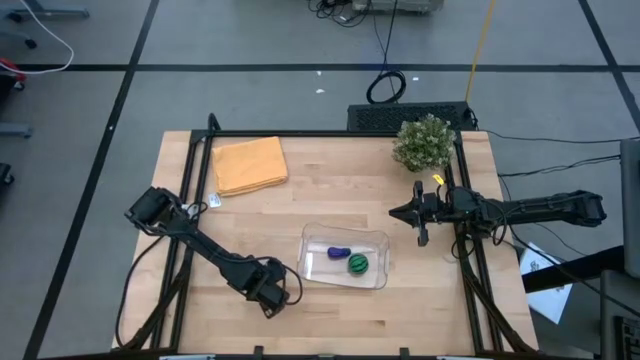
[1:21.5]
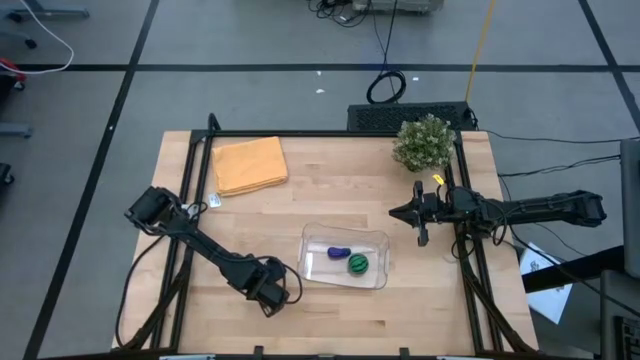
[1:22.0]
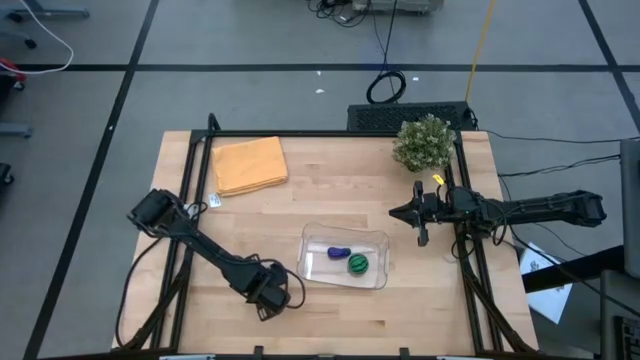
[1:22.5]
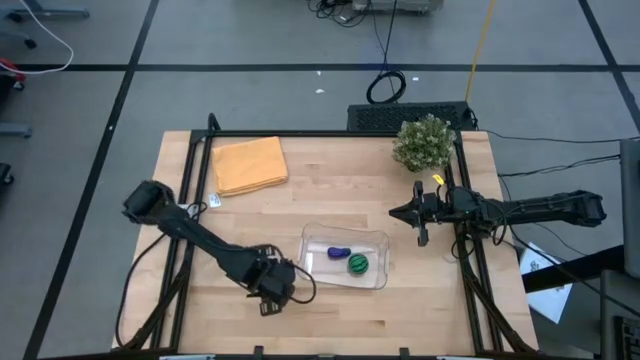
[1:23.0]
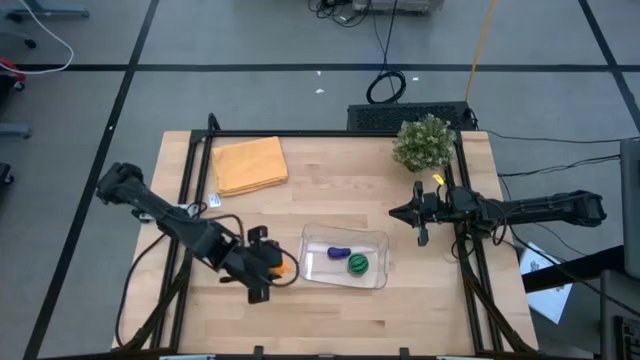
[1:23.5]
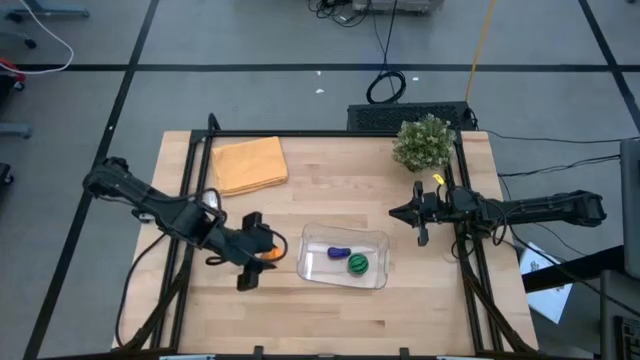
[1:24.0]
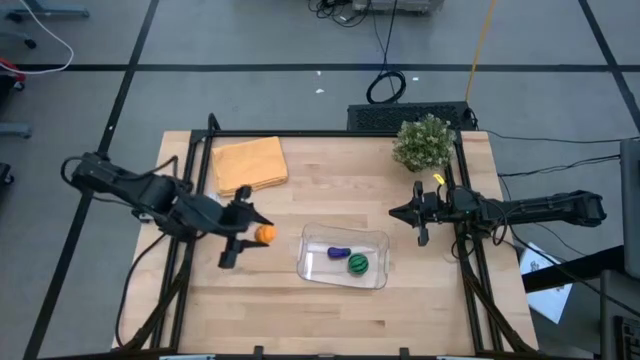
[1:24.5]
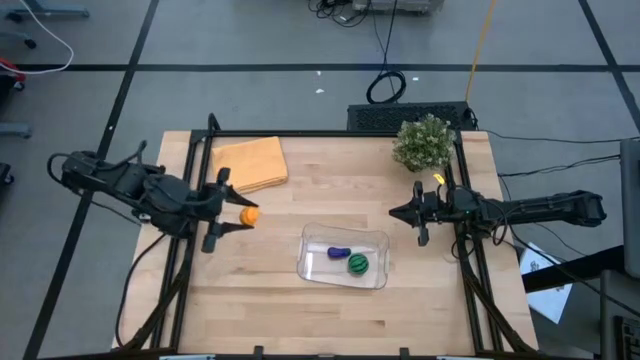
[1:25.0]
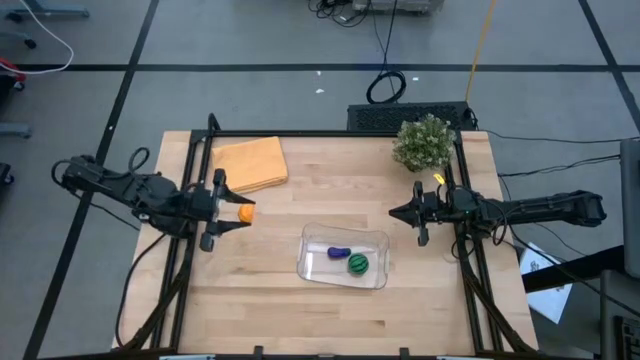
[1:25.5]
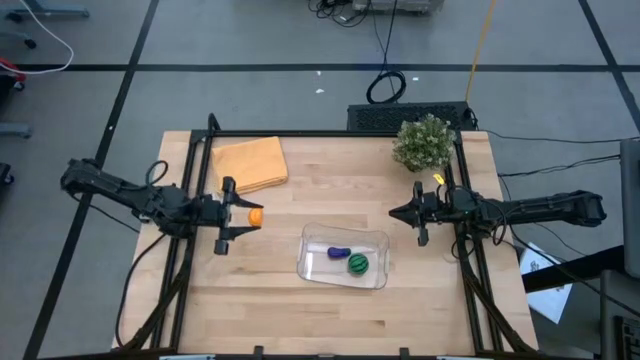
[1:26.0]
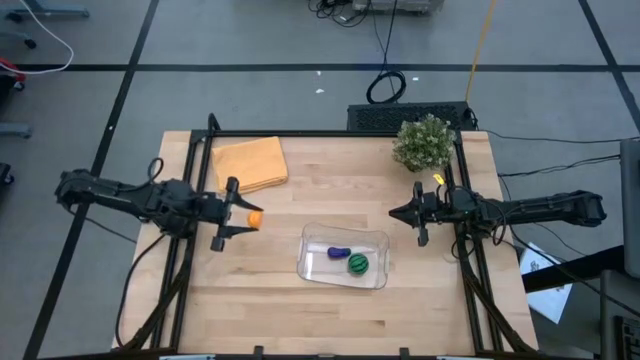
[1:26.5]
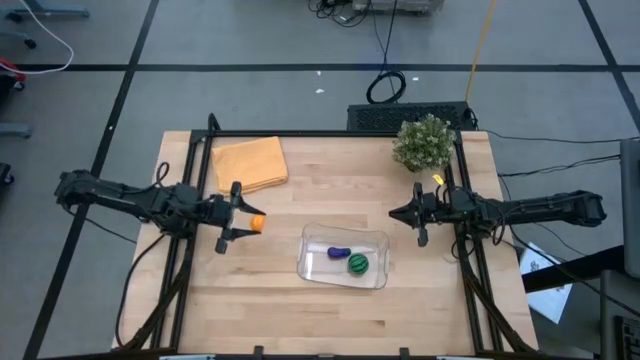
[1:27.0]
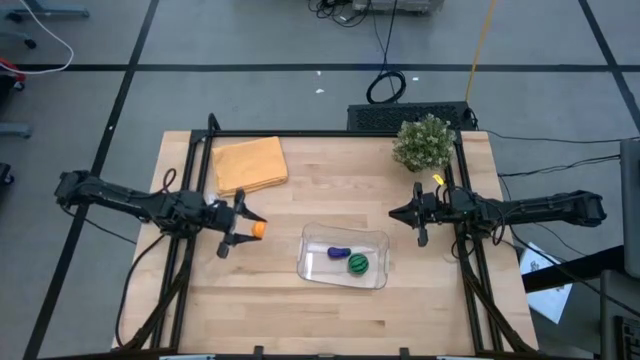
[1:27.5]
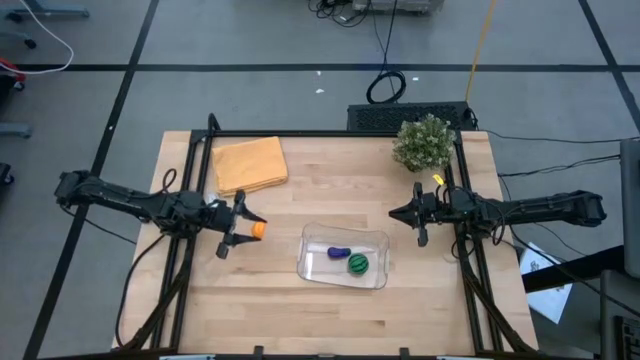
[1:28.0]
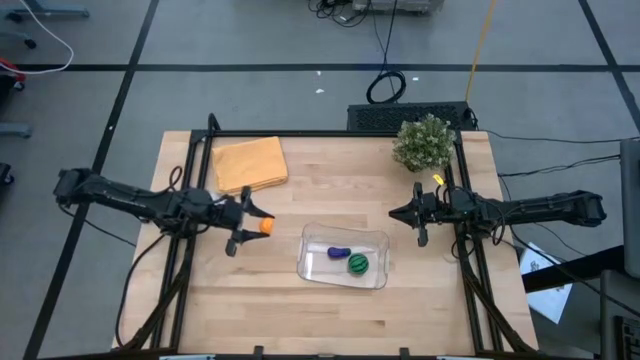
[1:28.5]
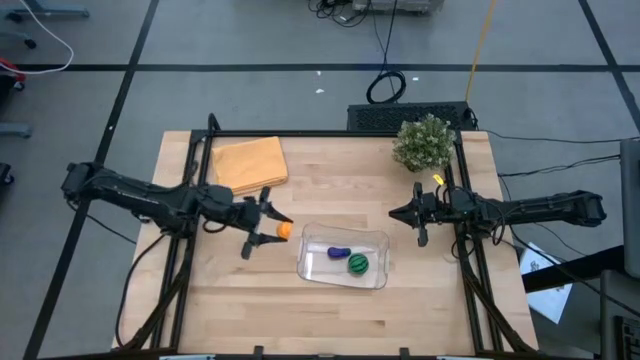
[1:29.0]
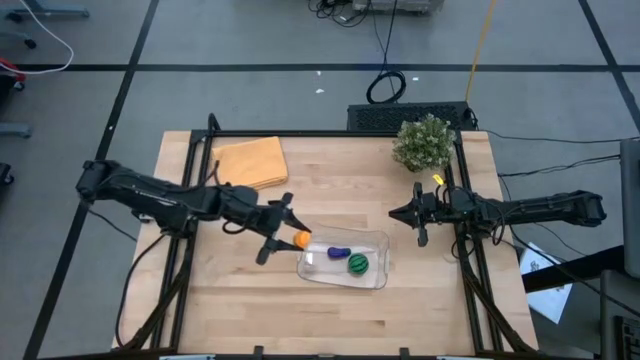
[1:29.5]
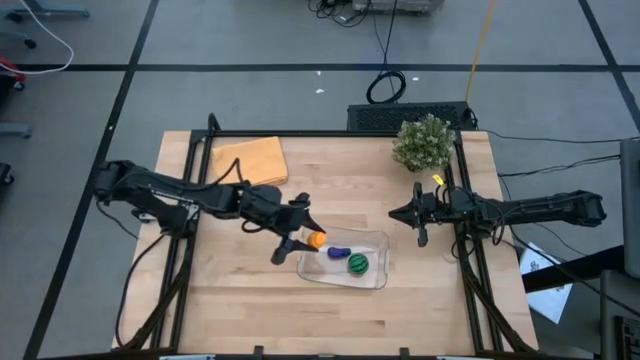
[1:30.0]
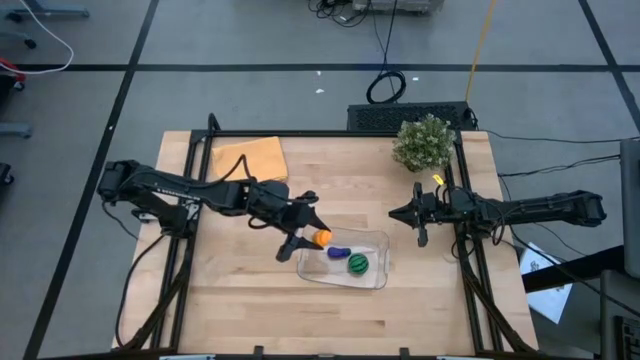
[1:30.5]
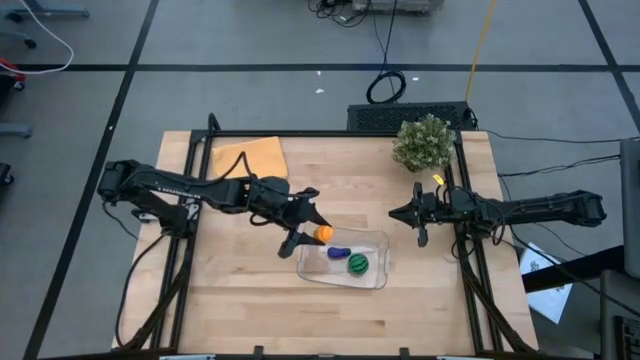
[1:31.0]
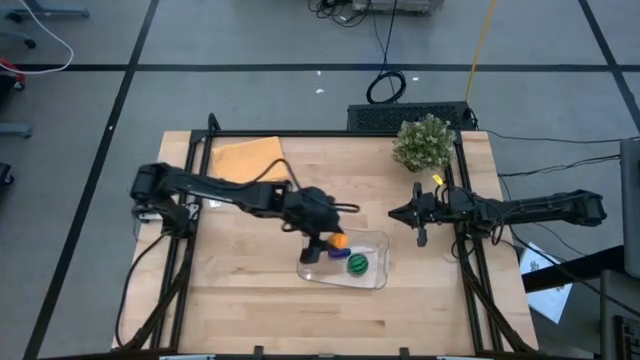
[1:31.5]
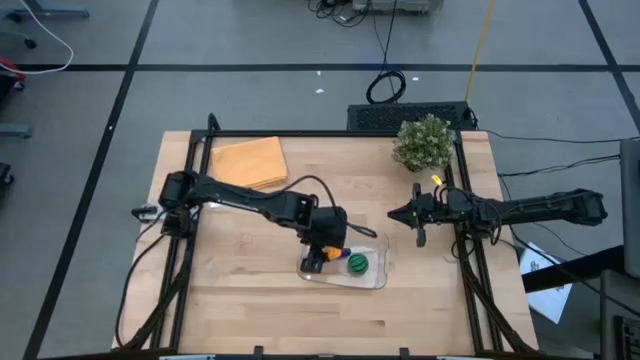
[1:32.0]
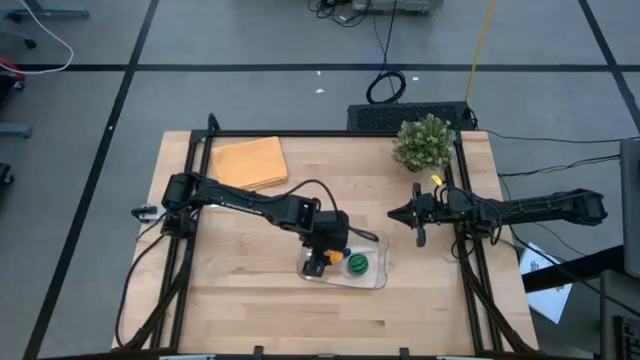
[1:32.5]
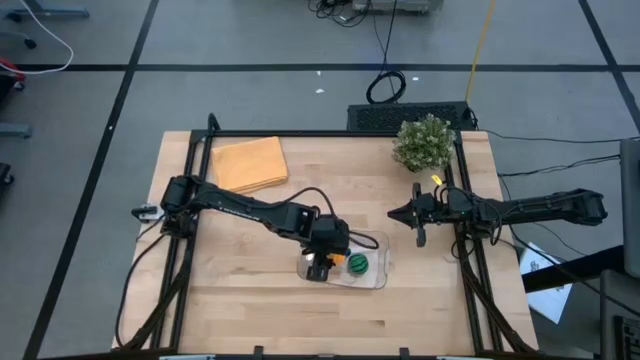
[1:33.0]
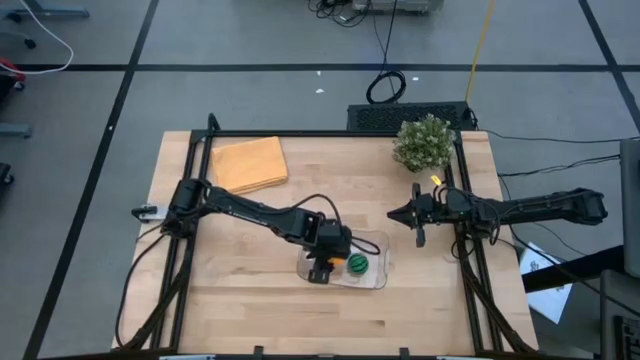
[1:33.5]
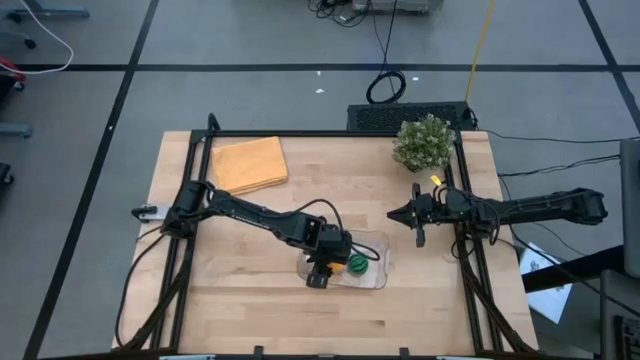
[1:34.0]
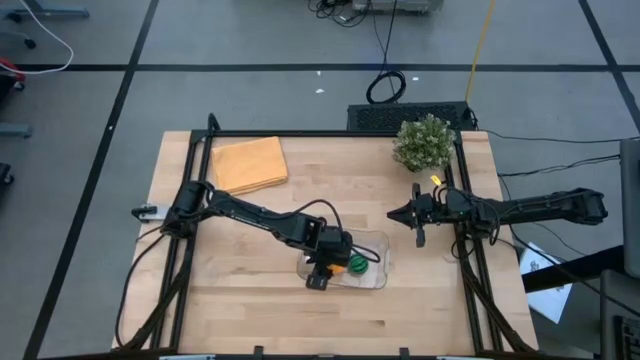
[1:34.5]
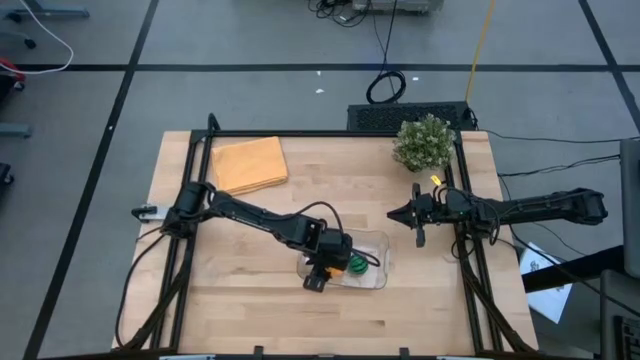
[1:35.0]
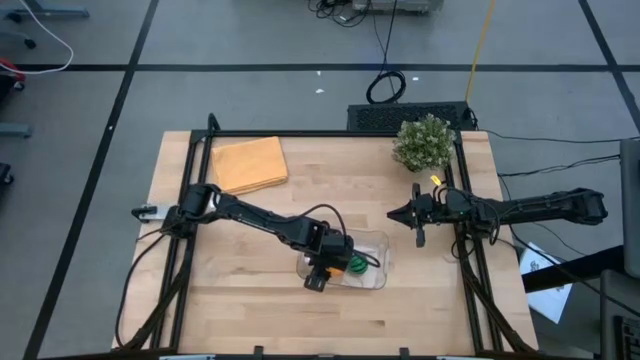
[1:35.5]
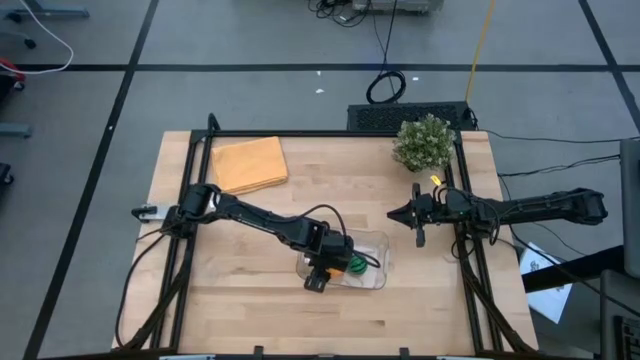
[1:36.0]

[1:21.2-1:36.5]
Task: Pick and placing Produce into tupperware
Put the orange croissant into the transparent bin

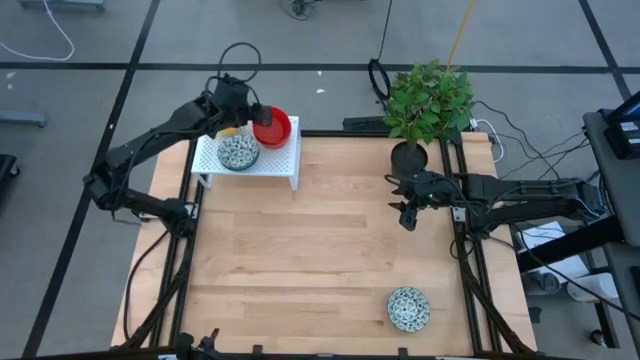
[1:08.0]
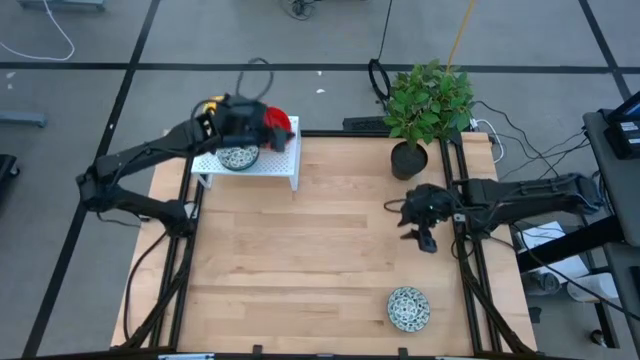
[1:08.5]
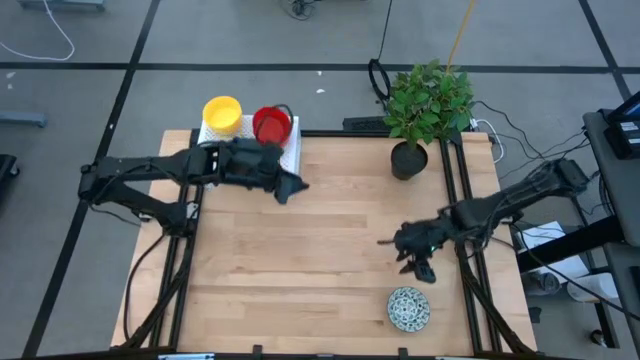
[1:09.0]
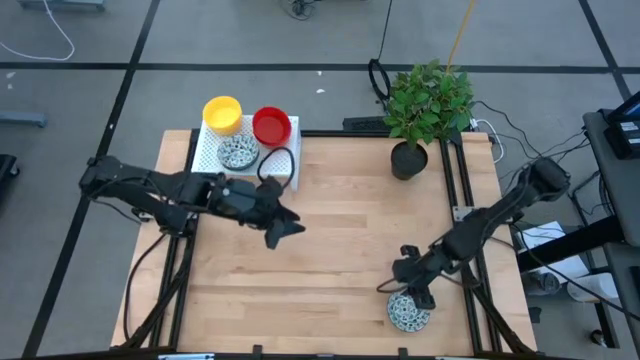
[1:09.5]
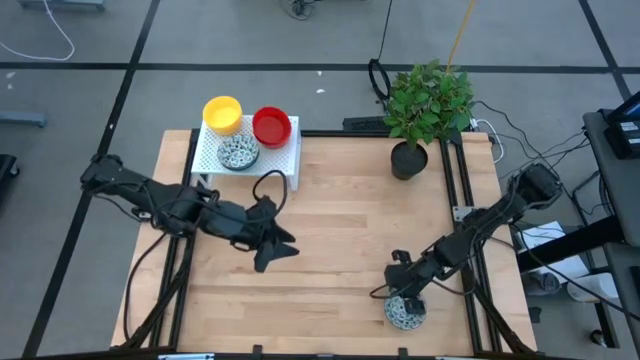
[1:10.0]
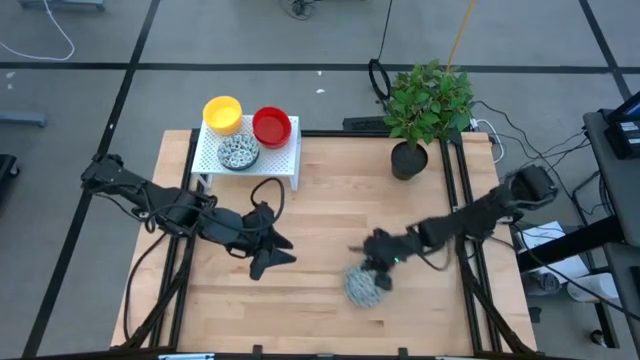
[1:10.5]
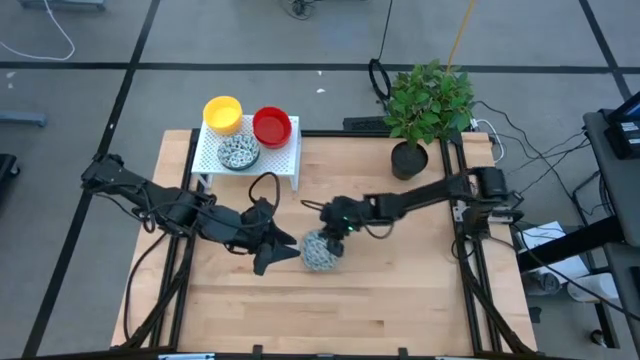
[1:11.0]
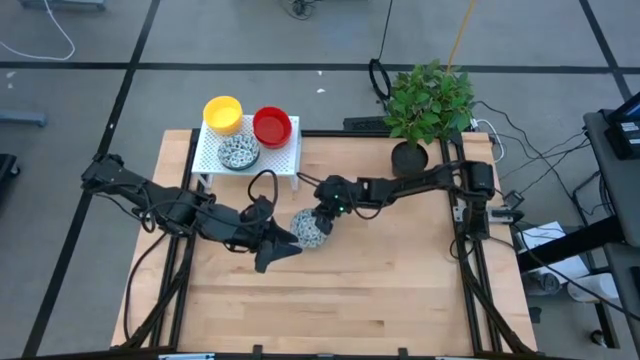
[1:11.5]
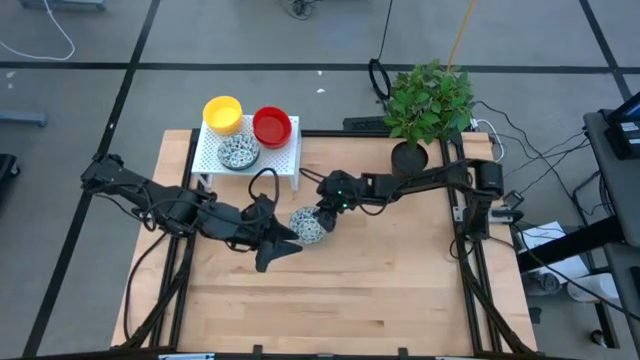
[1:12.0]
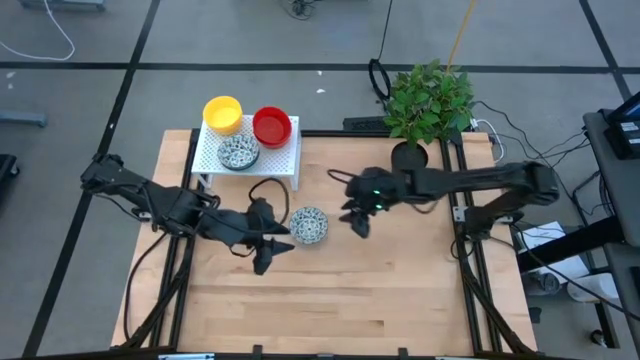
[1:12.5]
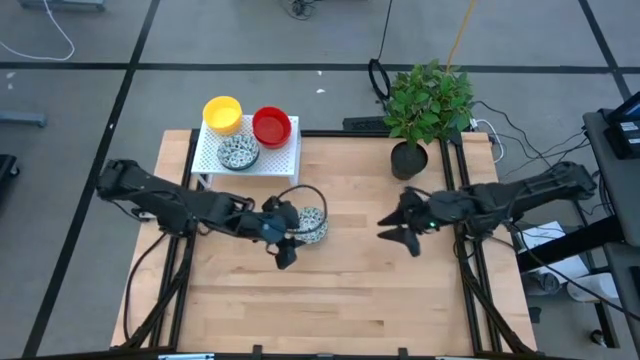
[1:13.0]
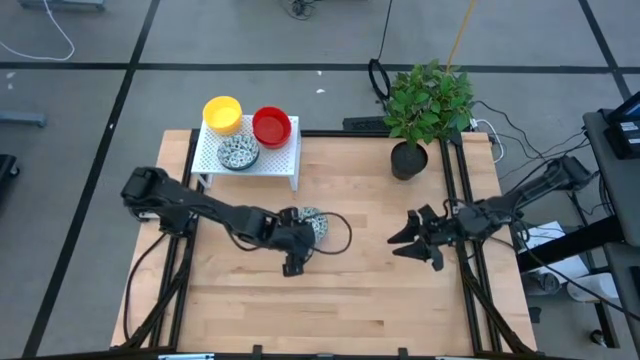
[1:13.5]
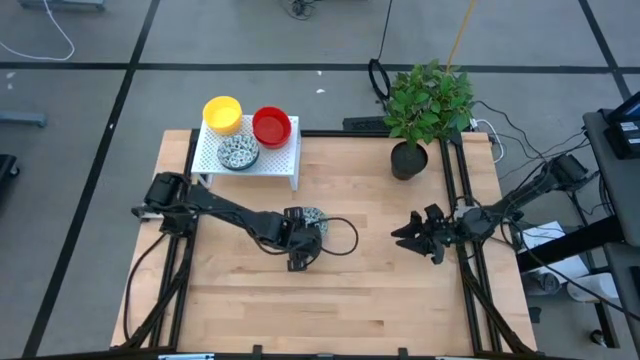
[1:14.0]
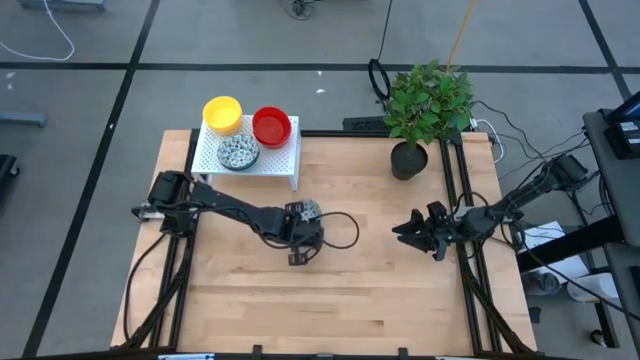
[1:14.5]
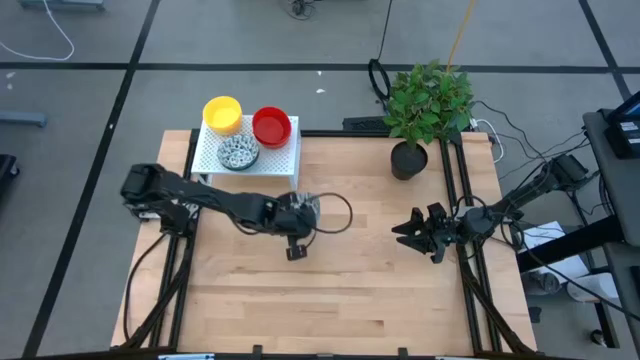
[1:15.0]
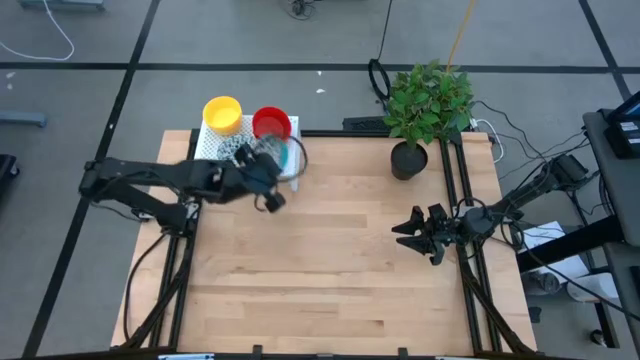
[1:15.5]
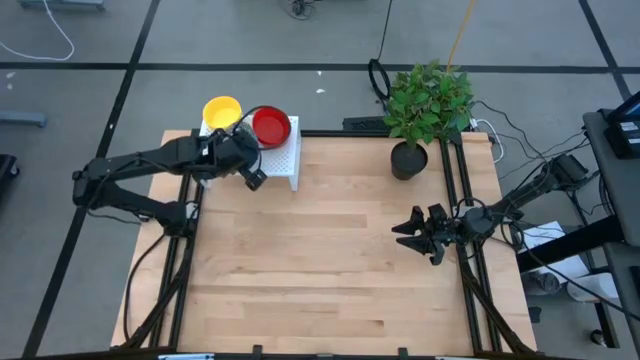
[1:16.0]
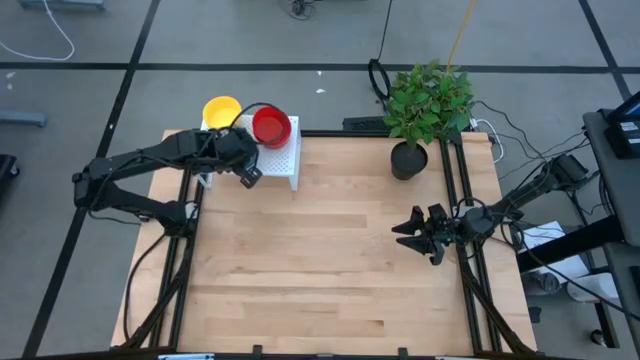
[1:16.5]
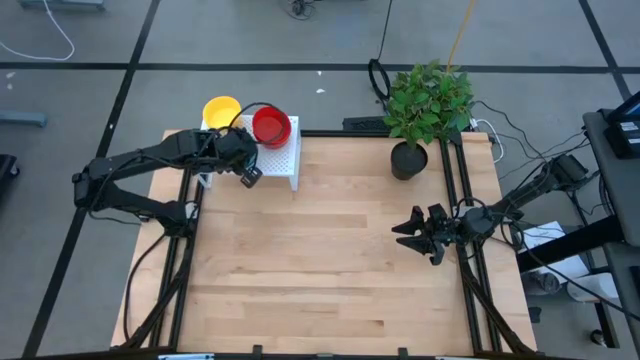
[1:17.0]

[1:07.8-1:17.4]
Task: Pick & Place Mini bowls
Stack the white patterned bowl on the white patterned bowl on the shelf
